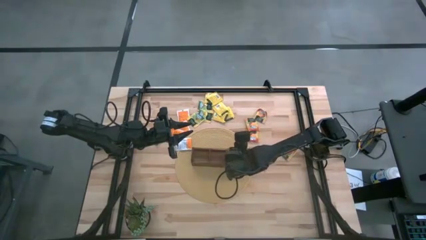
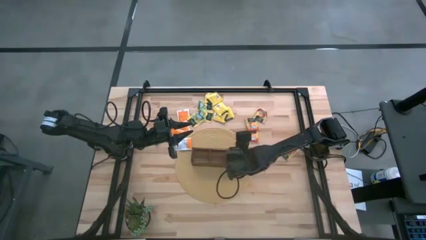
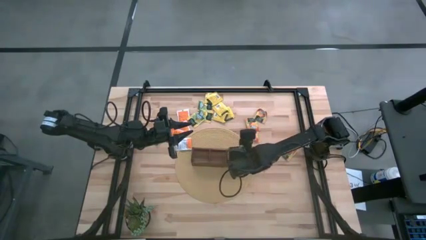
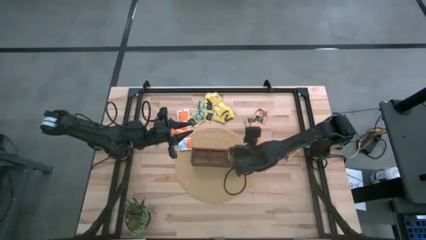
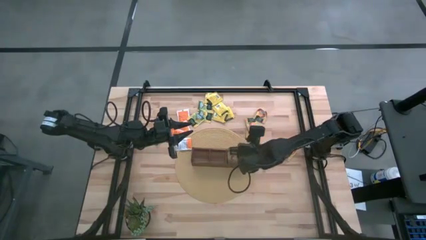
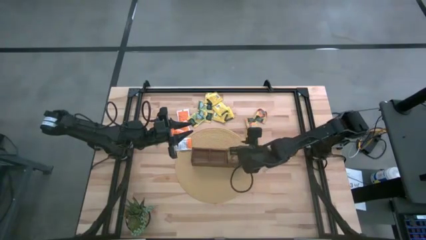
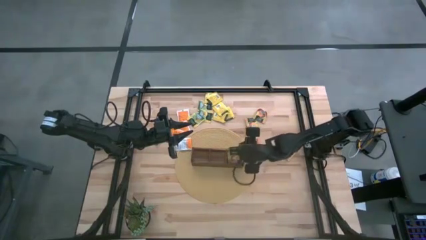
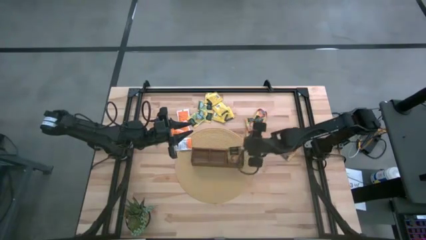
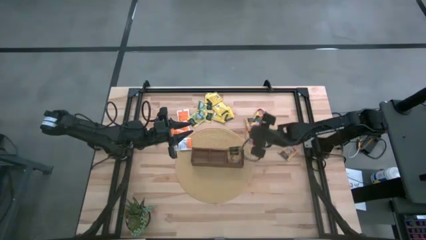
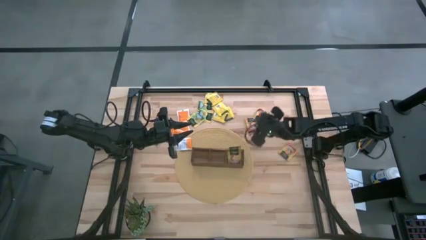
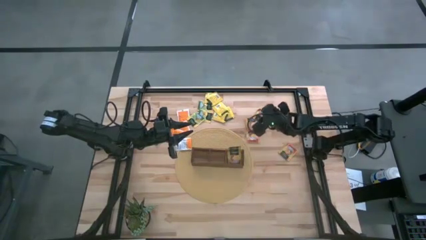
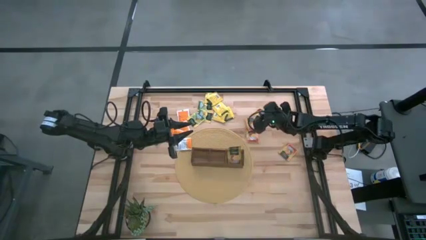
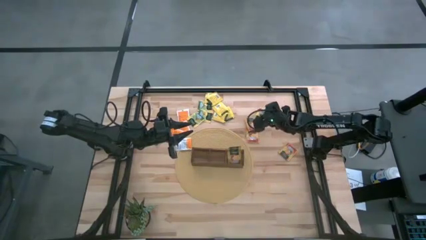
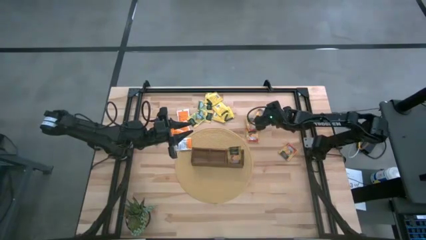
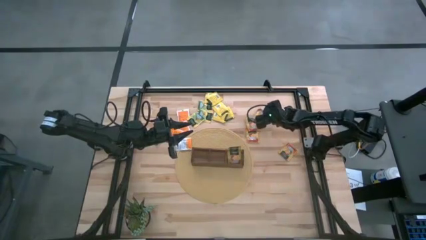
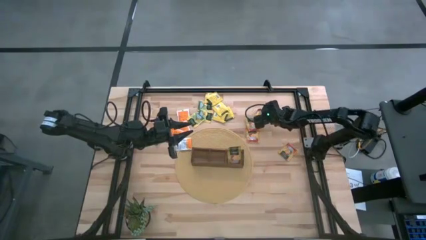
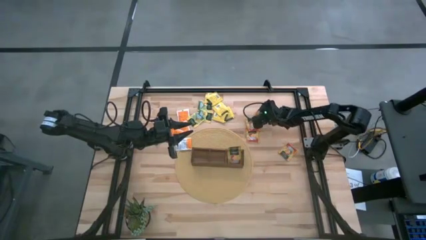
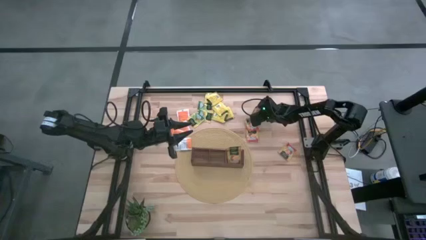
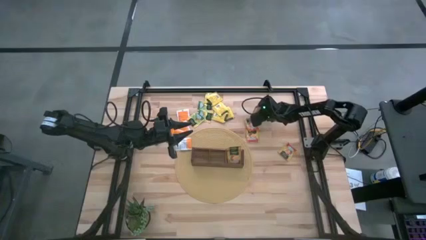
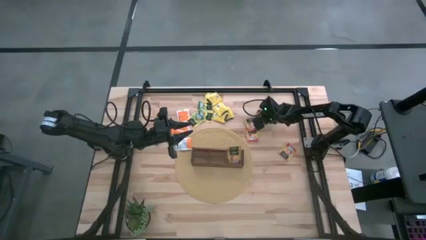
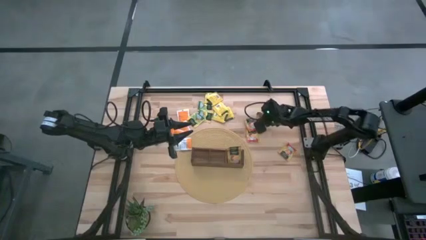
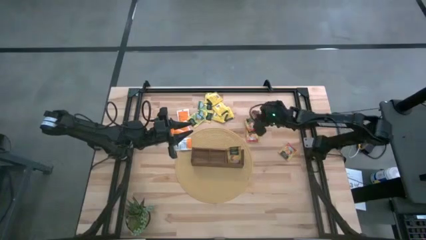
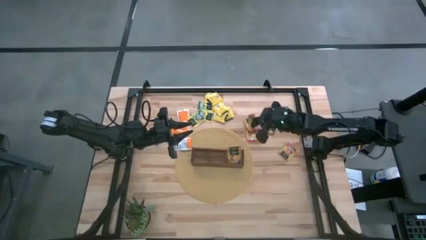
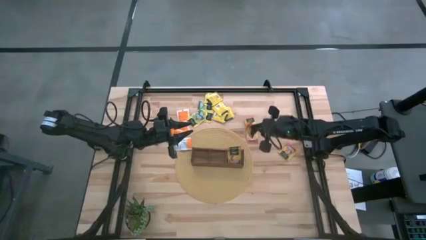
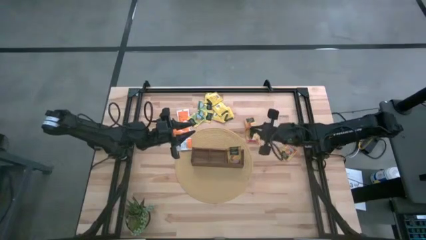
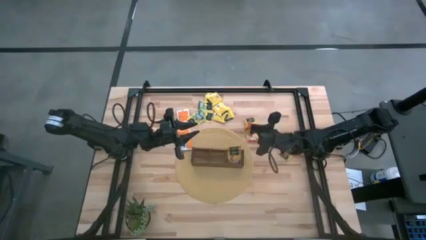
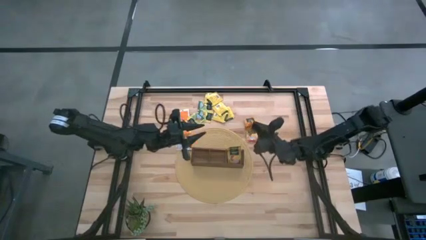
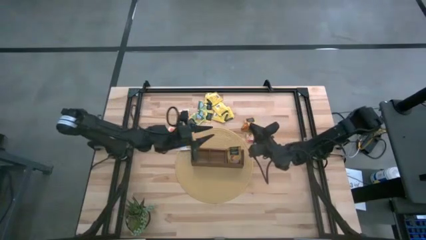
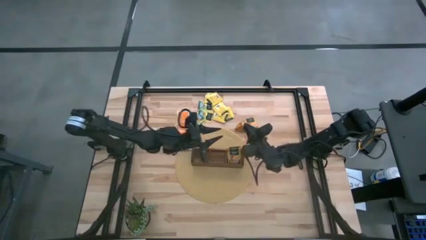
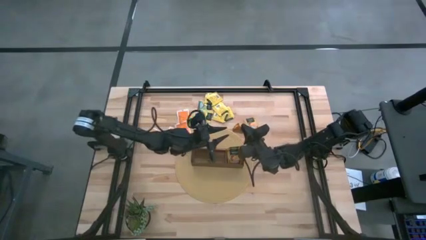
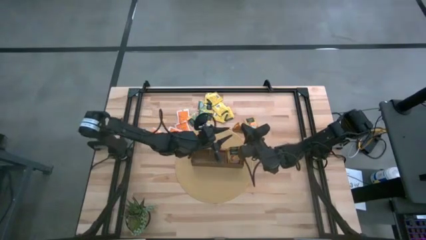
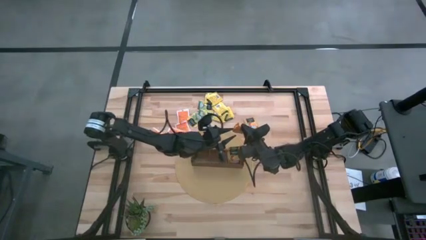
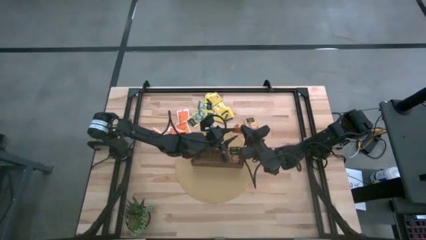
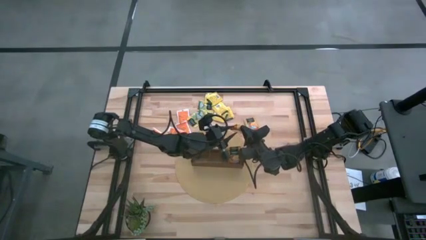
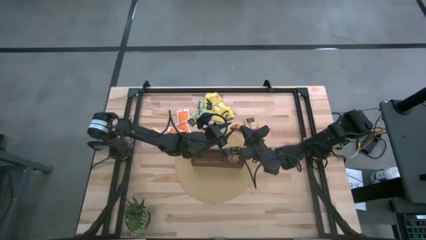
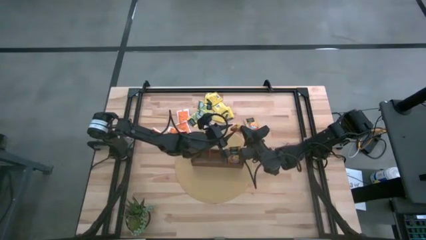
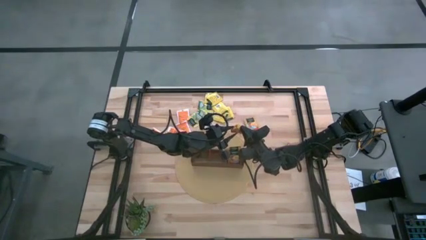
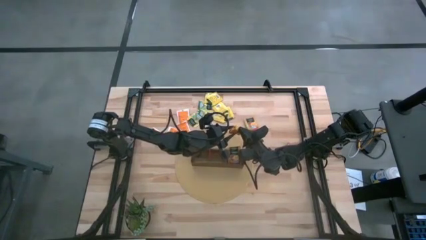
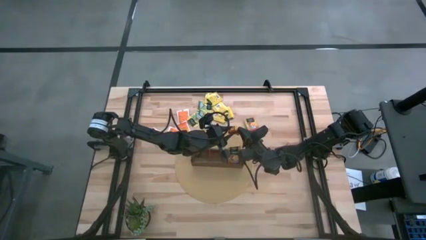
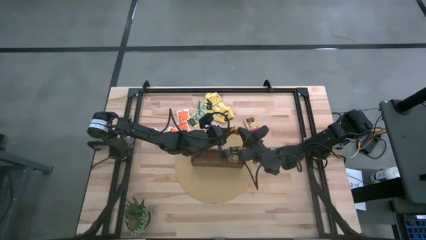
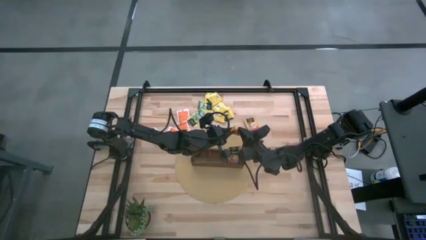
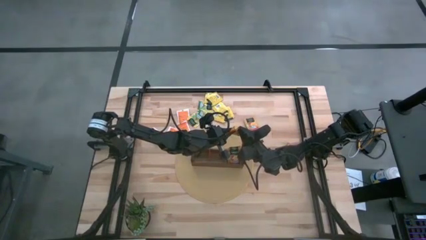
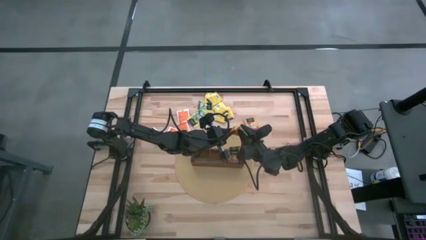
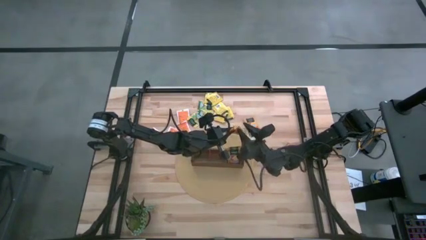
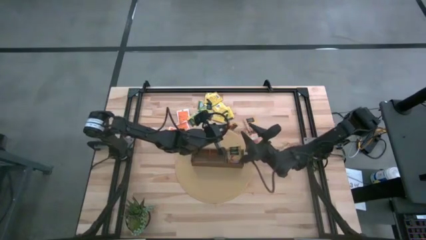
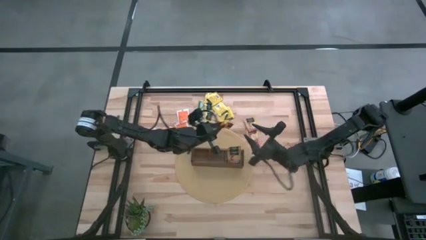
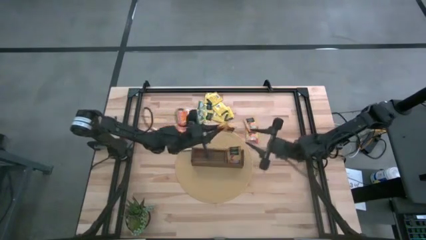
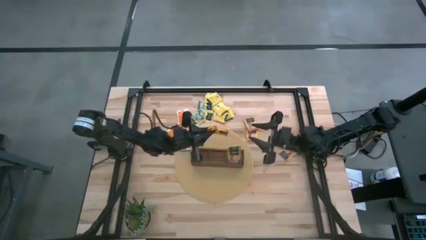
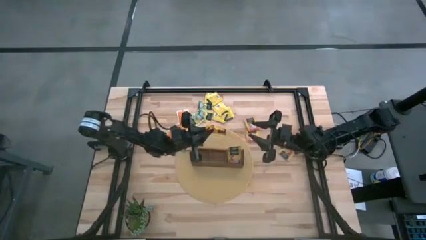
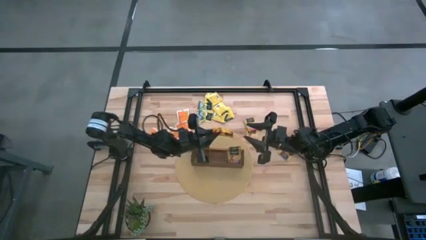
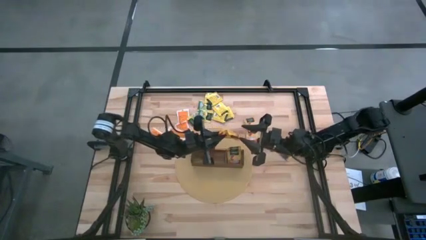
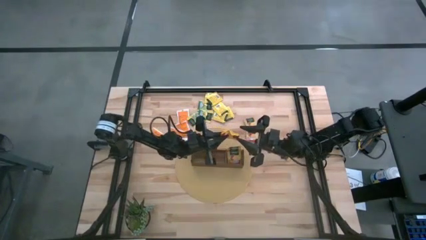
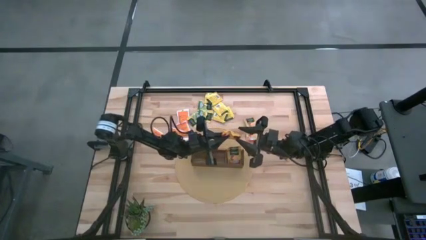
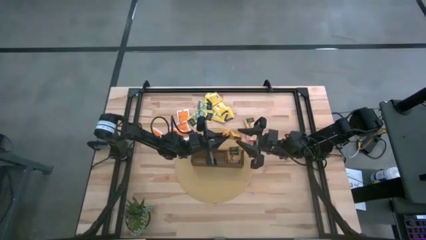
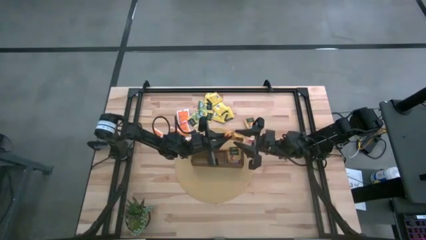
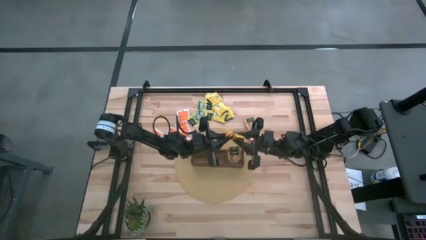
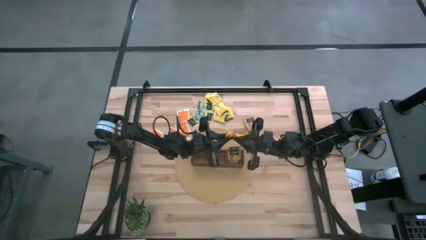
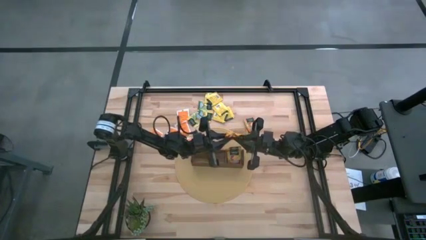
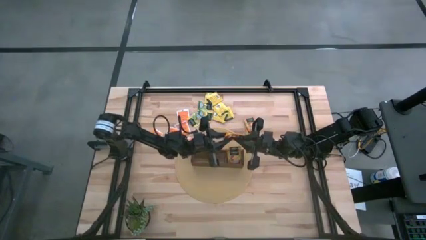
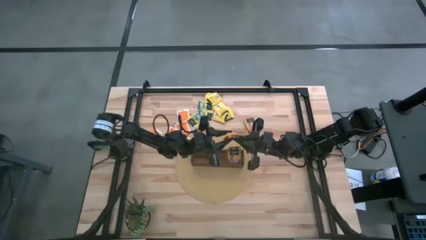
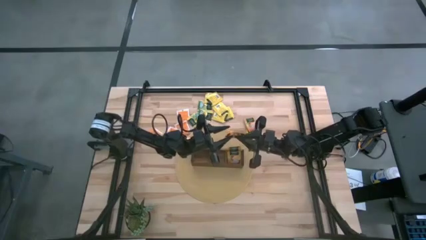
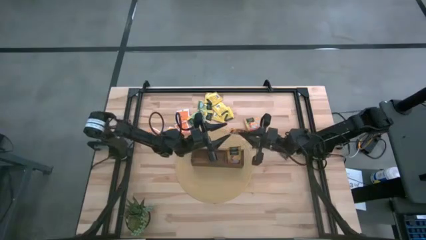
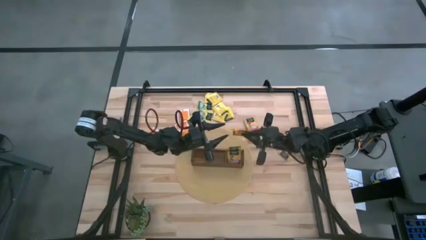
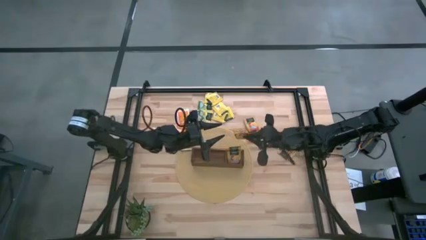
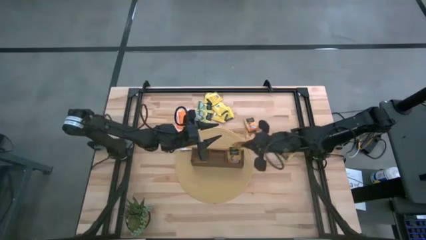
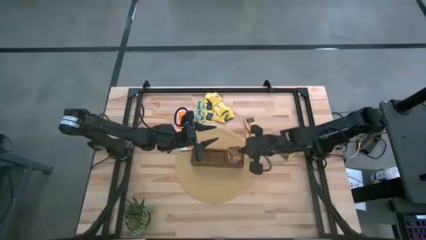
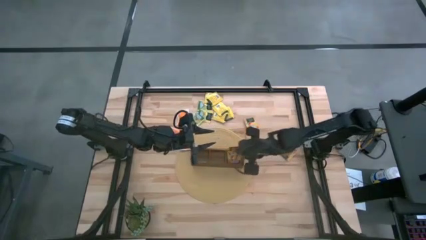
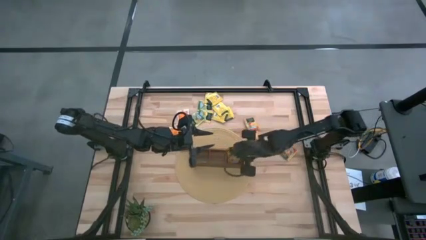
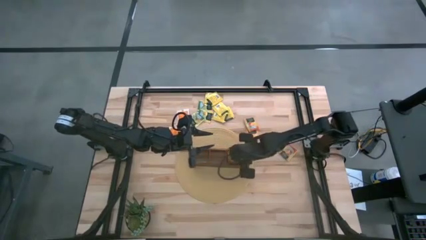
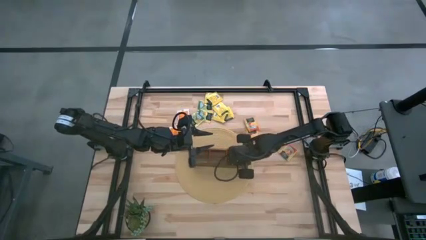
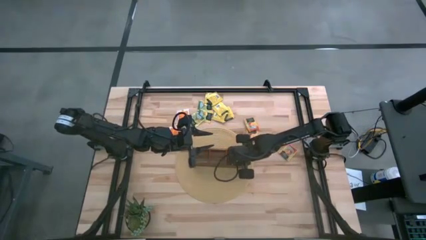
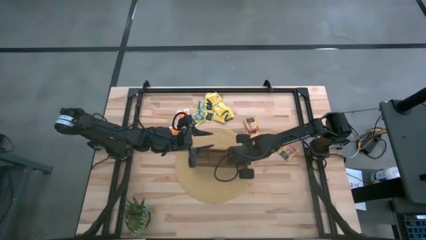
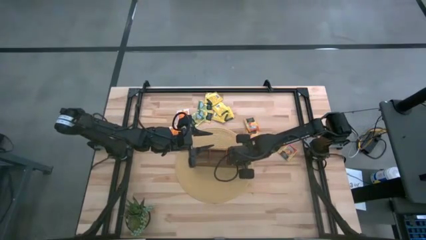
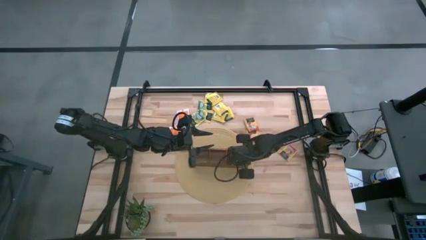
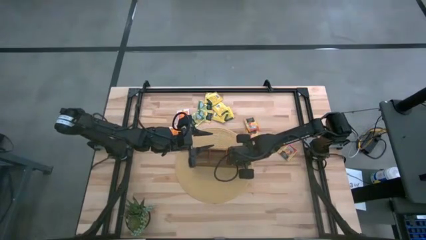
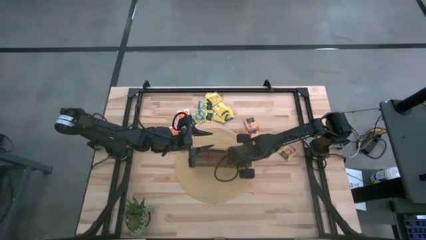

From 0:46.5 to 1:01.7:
Task: Pick & Place Tea
Put the orange and green tea bag into the wooden organizer

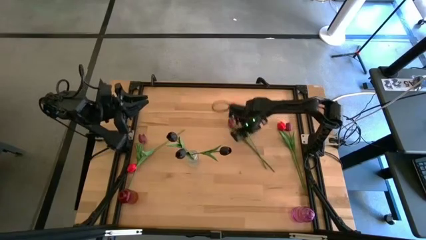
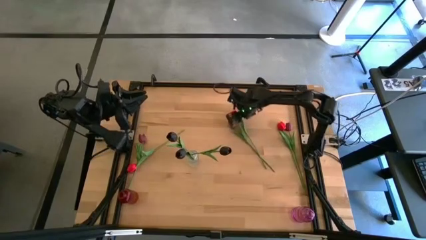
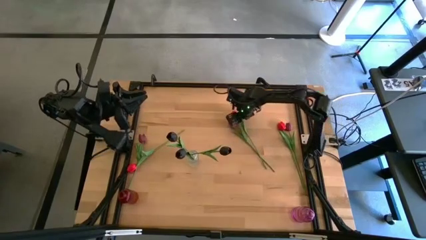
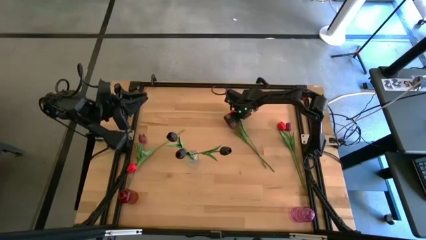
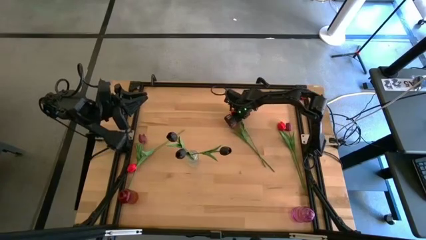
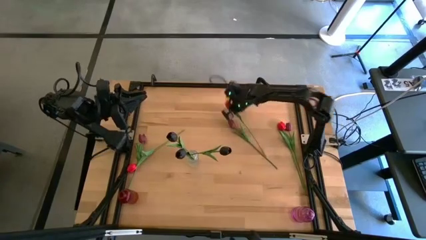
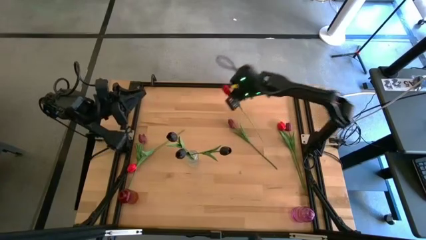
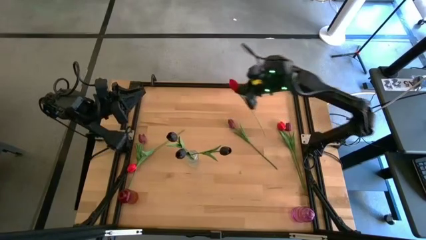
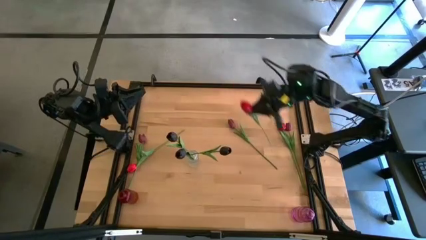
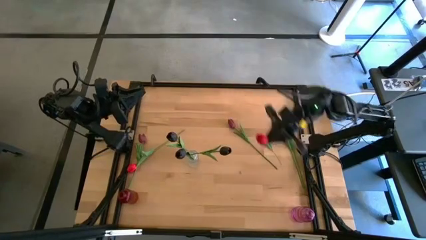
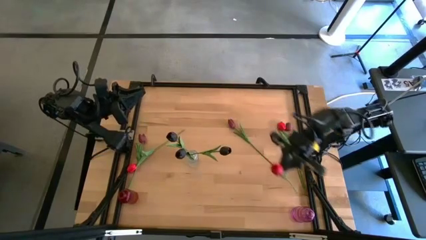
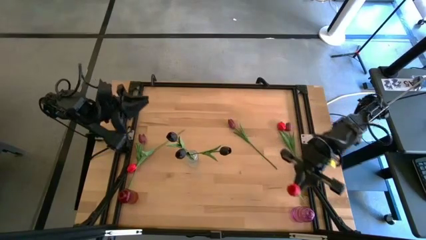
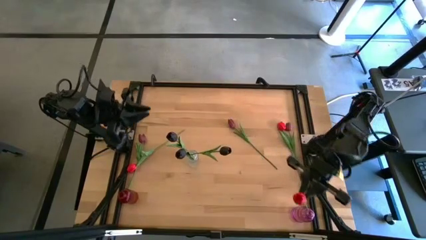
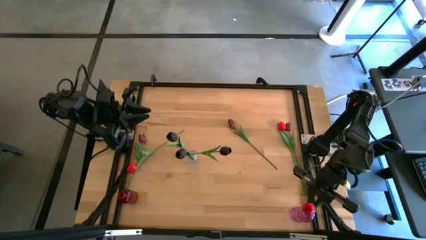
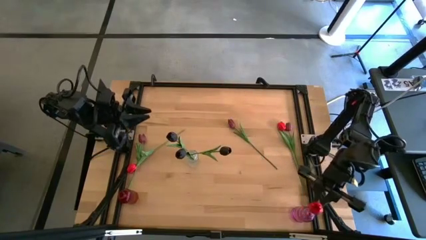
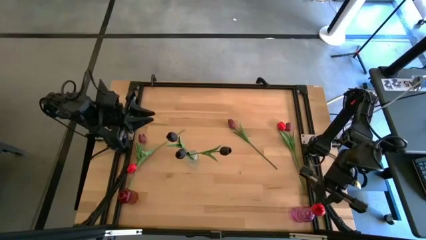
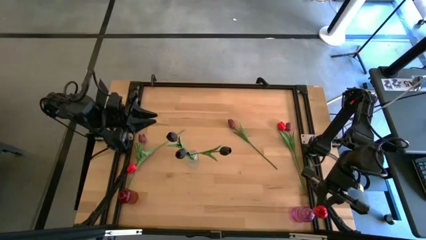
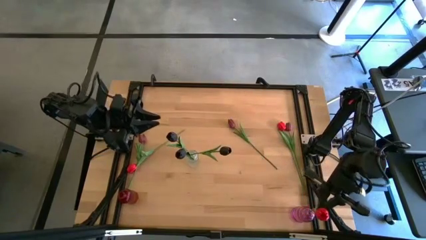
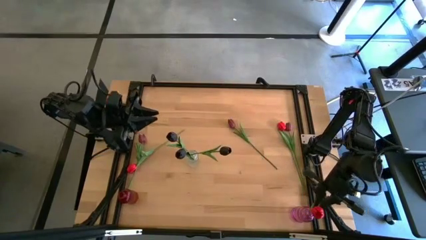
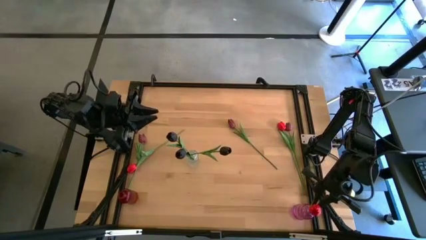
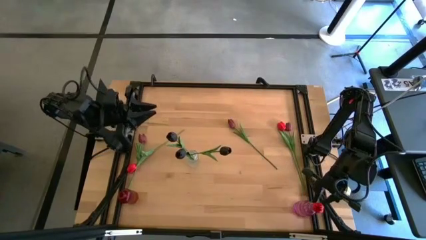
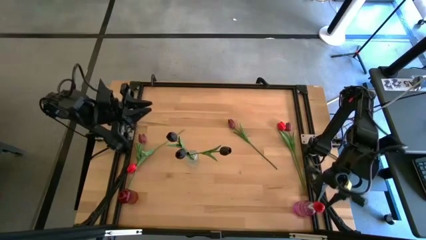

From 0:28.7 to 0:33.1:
Task: Sort flowers into vase by color
Put the red flower into the violet transparent vase
